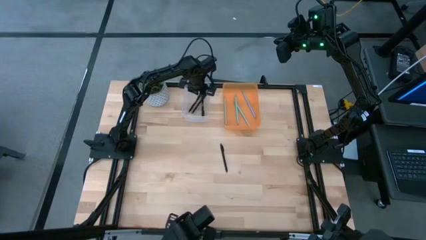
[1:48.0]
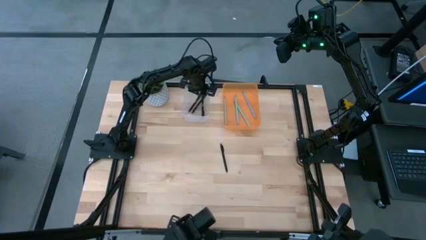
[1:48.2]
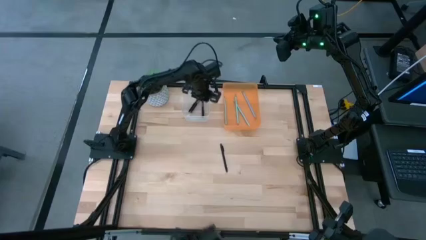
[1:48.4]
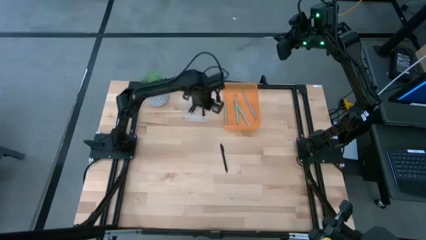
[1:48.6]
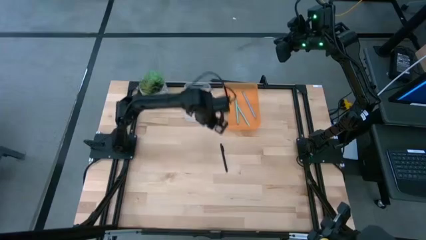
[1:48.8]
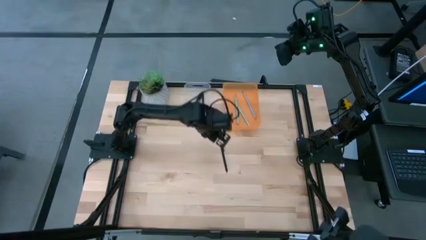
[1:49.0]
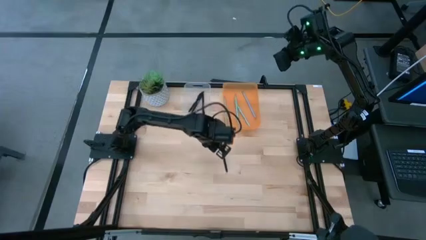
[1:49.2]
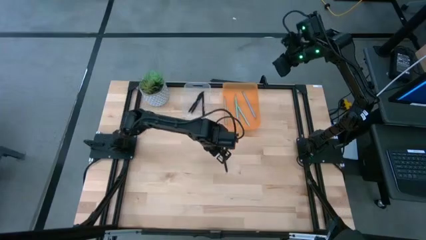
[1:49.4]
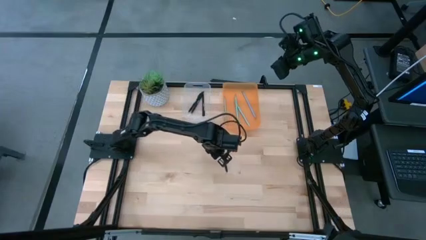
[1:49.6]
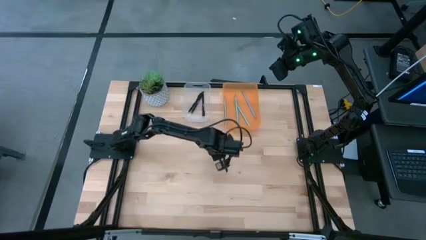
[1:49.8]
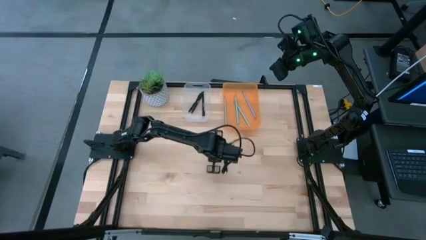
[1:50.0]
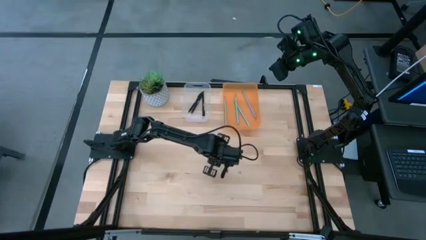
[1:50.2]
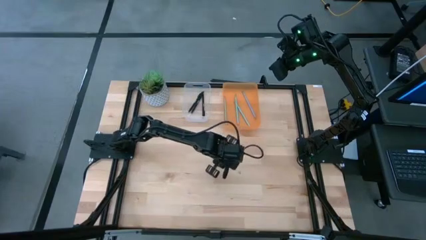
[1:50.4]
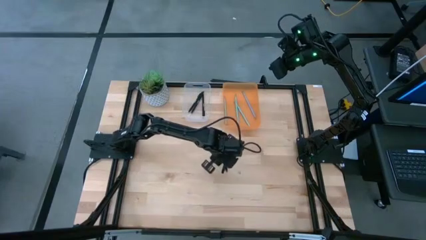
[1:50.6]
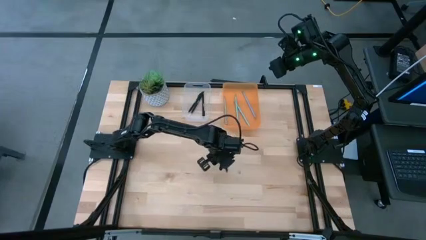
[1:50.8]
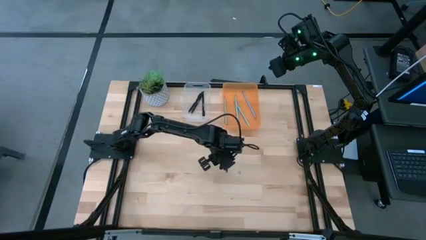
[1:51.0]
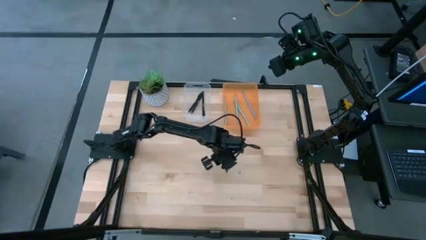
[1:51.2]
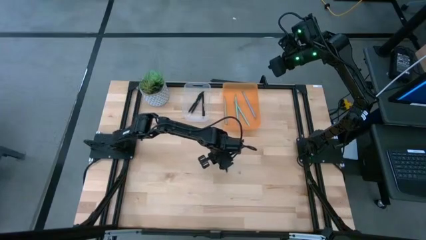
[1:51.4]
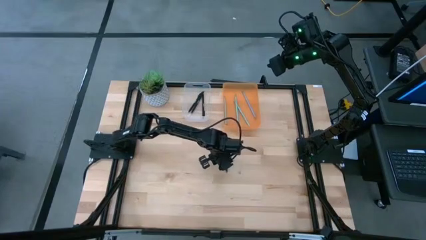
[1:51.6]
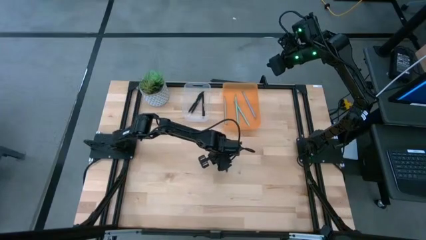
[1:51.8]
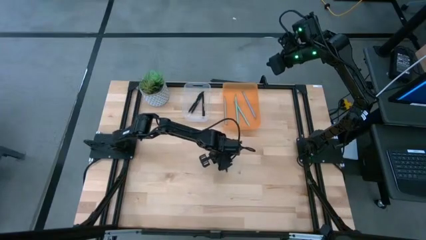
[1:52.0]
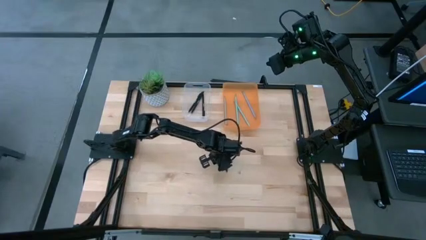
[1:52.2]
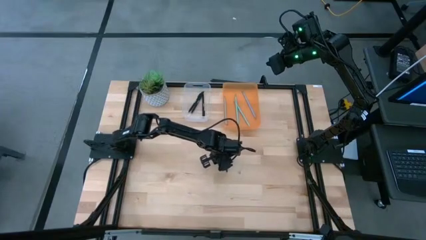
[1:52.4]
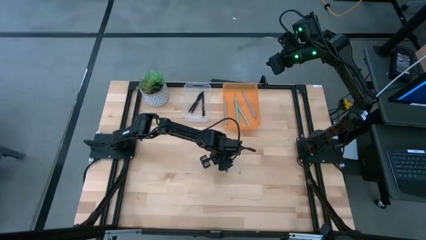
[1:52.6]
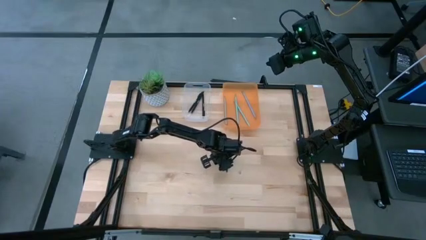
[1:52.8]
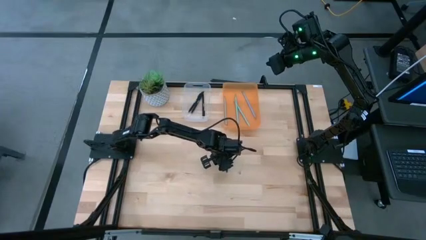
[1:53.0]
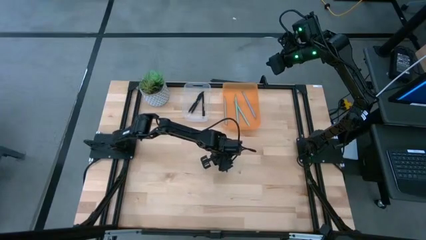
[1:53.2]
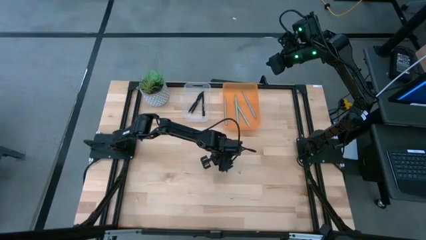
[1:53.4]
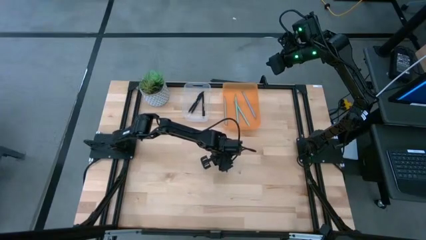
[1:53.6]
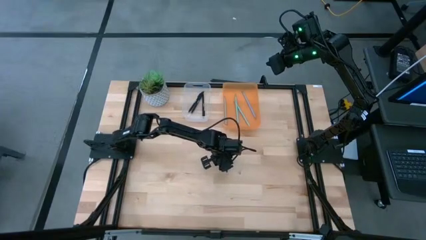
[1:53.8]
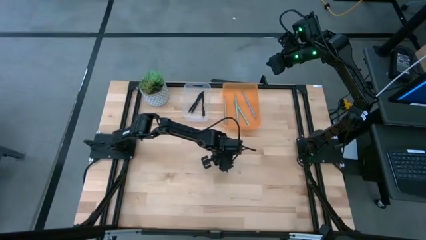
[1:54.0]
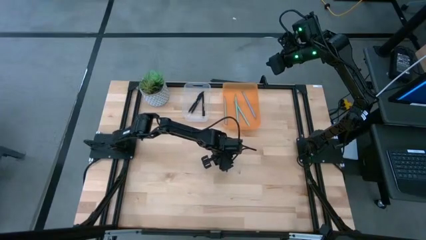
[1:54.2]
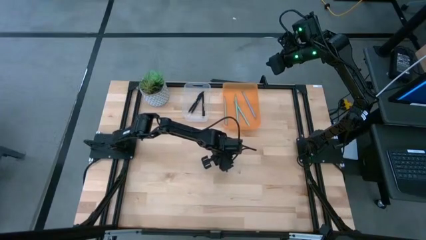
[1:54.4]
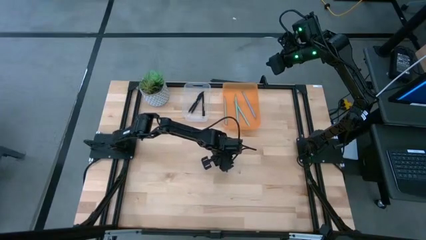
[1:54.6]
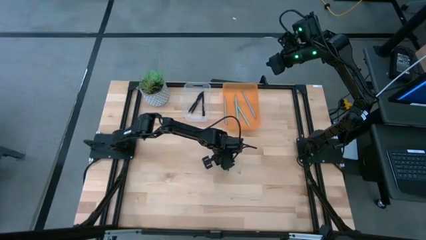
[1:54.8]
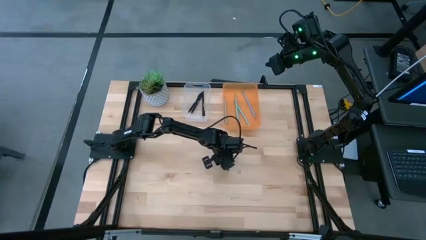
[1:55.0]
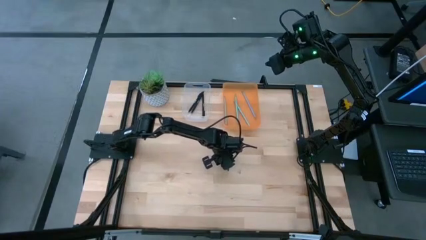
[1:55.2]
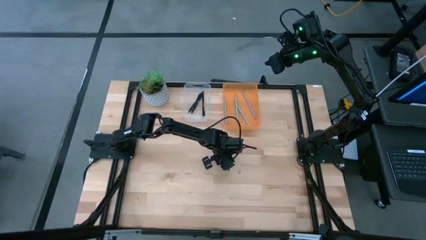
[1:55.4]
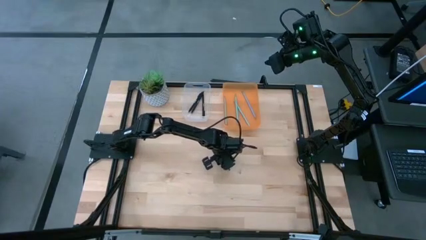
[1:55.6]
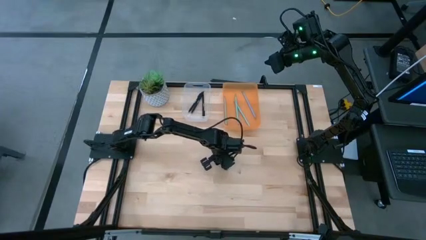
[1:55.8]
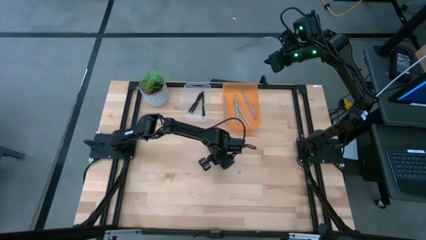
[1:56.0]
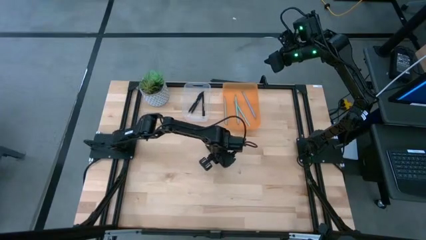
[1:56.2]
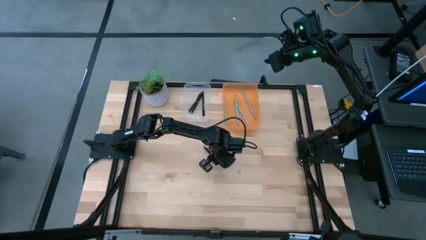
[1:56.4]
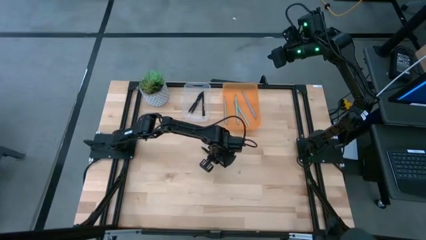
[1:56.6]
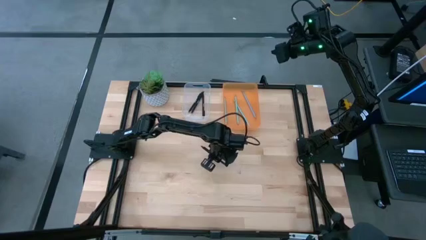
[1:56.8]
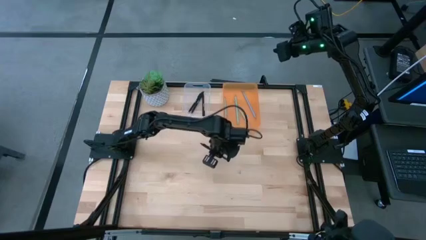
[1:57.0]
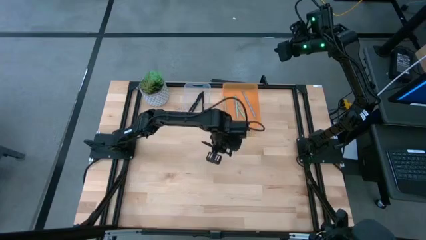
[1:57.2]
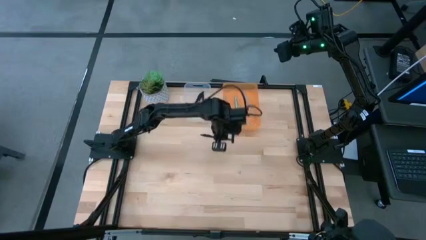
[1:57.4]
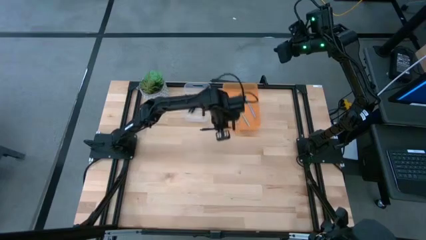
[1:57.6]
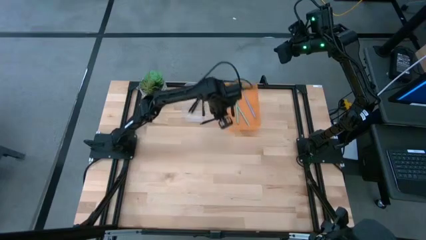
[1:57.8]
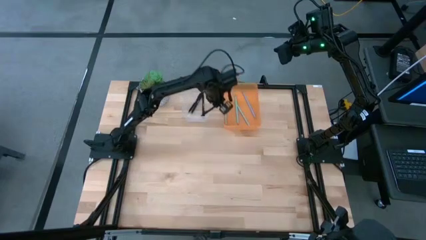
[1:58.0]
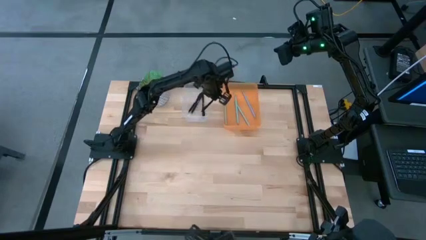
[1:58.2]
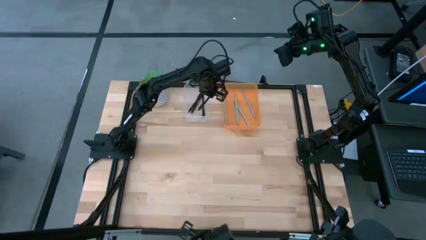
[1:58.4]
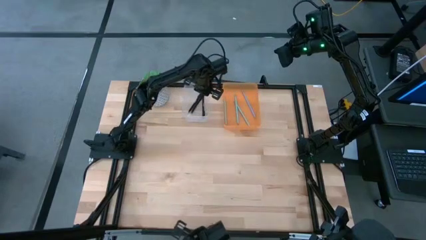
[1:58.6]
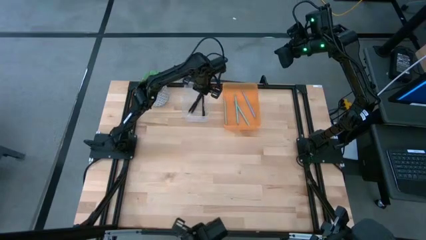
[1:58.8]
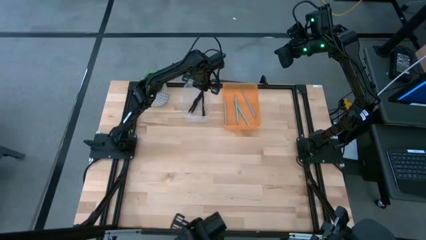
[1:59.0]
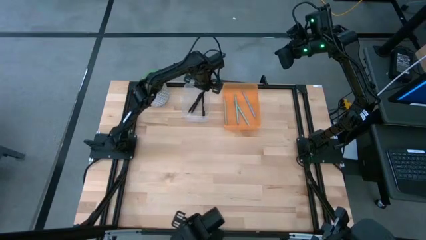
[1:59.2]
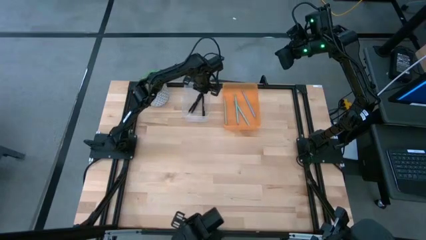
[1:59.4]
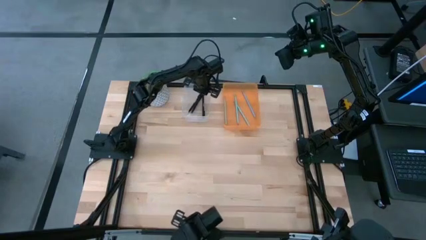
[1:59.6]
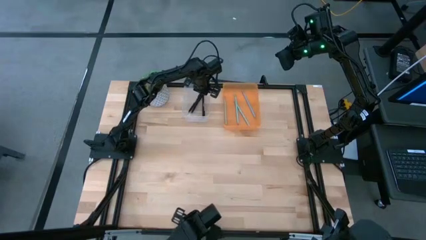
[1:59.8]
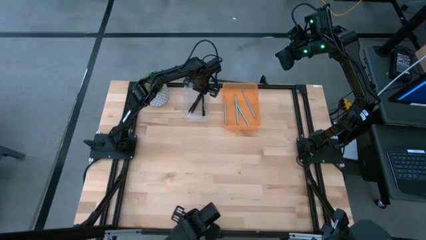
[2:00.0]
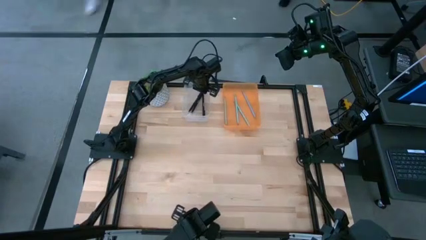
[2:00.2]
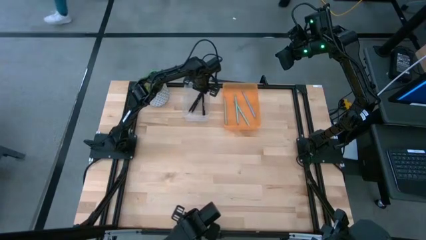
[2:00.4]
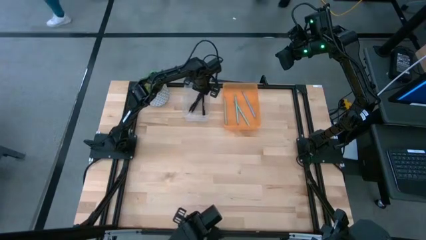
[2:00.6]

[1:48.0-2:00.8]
Task: Sort pens & pencils
Put the black pen into the transparent bin

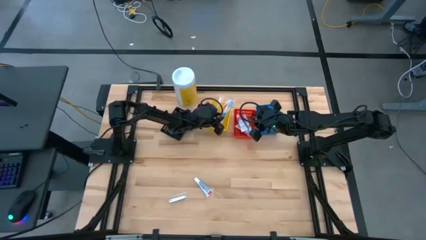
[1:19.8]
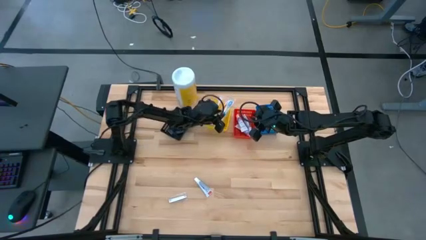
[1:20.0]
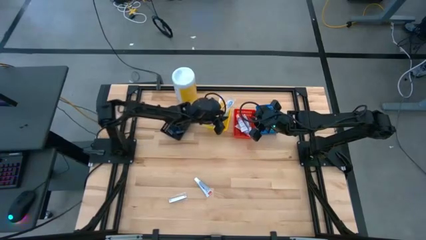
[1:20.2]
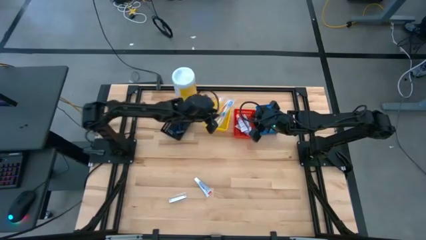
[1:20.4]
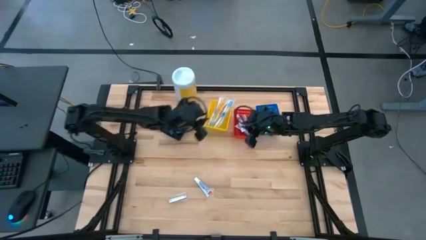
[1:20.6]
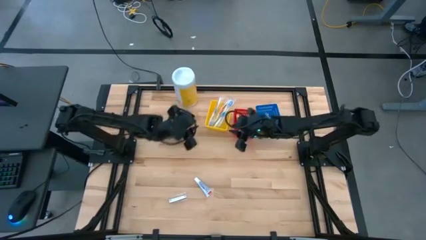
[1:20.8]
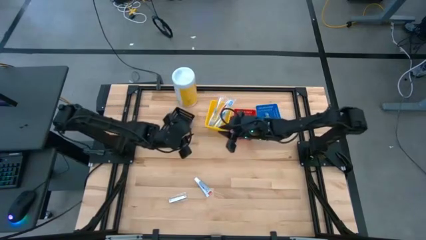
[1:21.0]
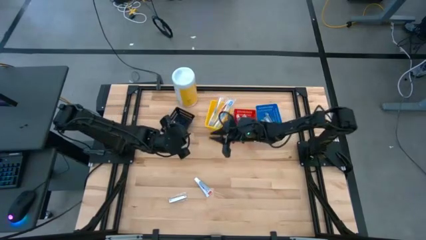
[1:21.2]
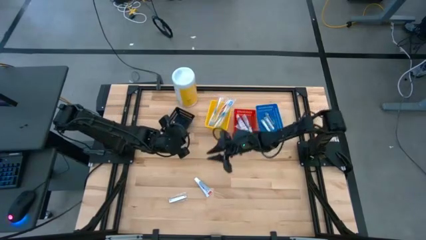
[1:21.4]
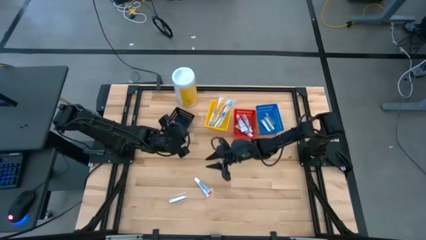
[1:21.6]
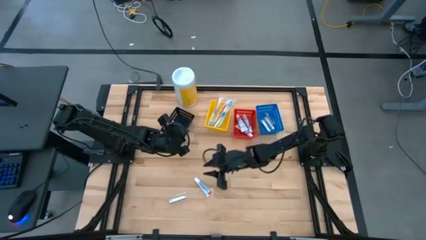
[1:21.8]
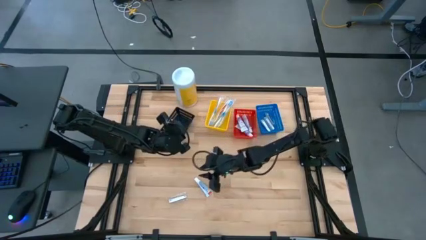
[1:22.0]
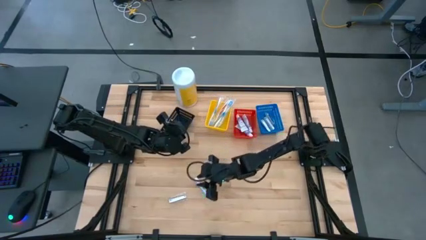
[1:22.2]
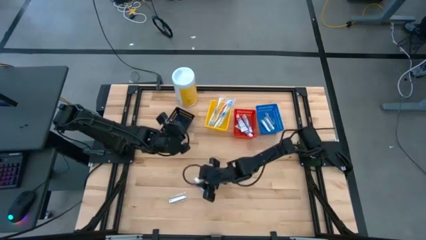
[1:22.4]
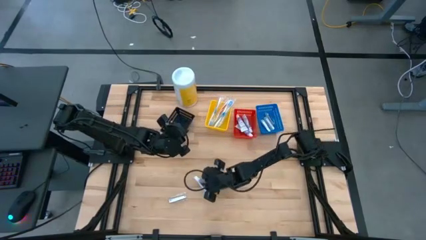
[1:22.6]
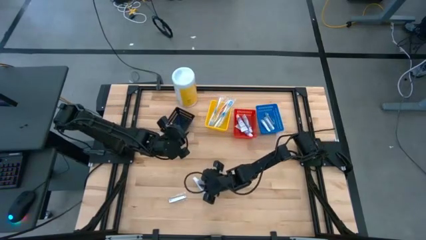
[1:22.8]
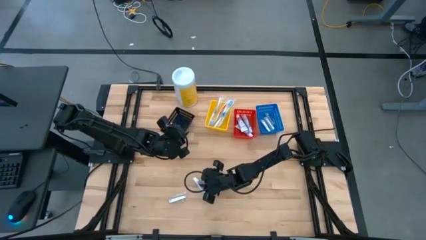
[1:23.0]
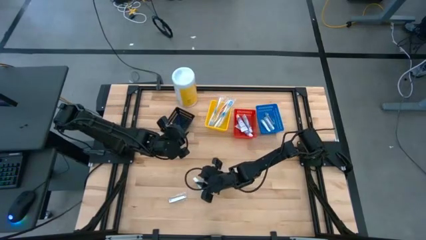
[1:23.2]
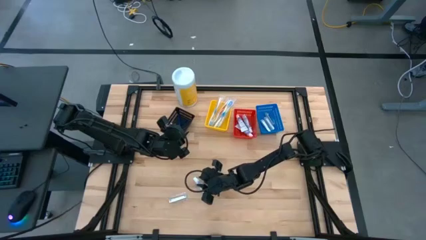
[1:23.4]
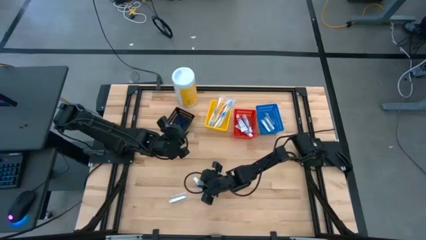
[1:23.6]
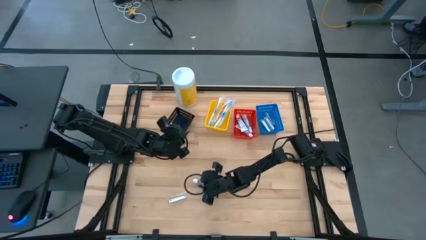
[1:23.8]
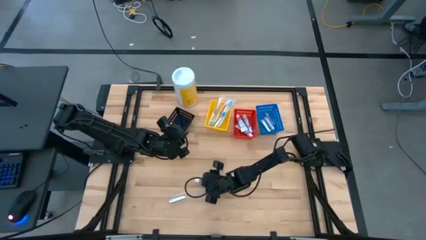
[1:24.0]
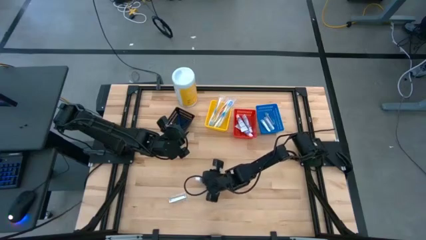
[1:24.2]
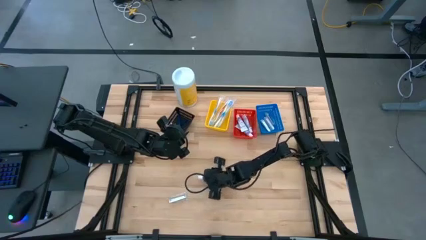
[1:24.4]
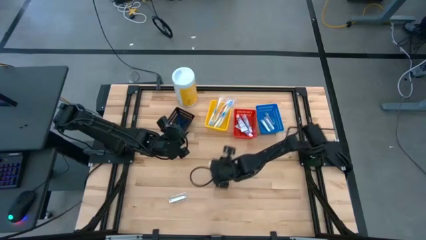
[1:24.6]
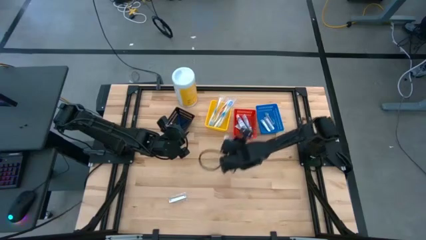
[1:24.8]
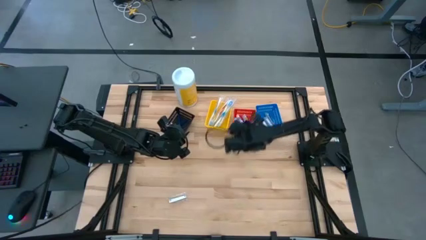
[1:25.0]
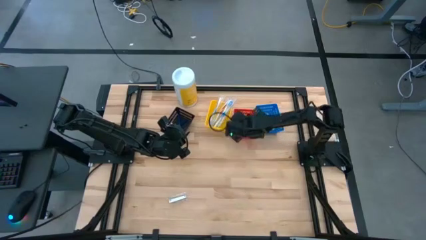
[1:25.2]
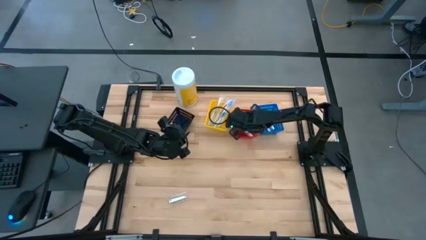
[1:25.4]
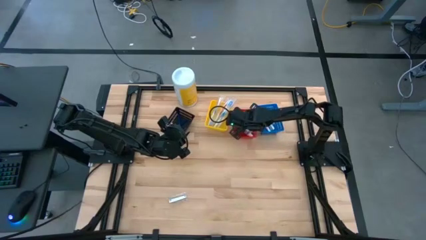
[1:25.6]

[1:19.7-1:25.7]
Task: Pick & Place Travel size toiletries
Put the white toothpaste into the red bin
